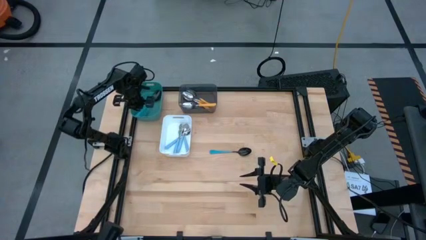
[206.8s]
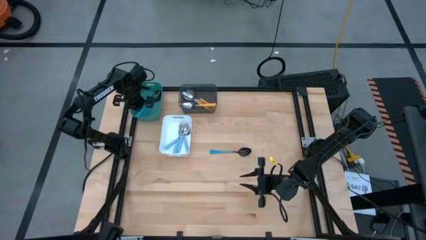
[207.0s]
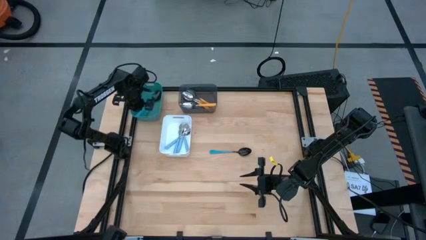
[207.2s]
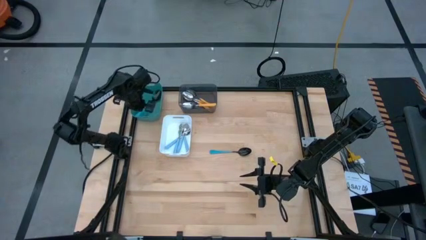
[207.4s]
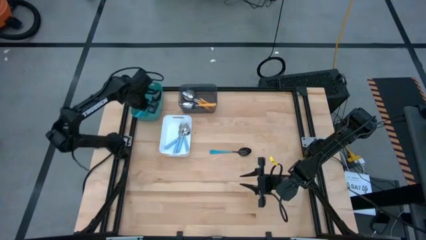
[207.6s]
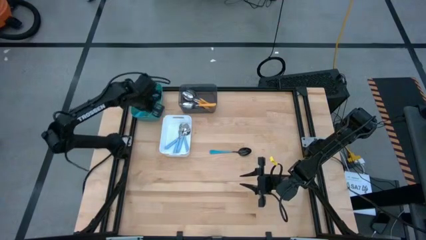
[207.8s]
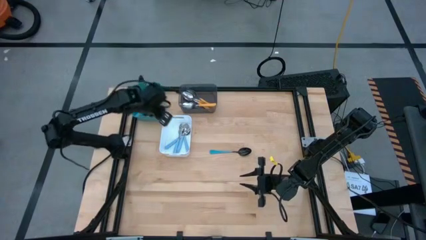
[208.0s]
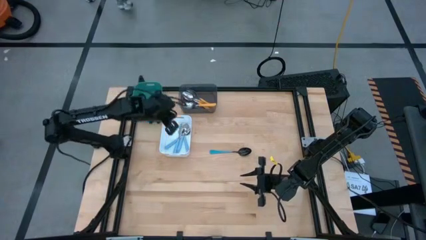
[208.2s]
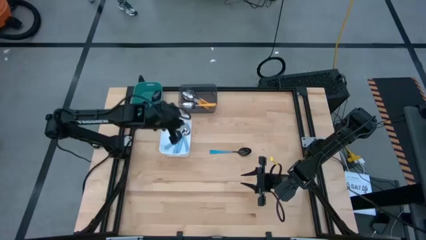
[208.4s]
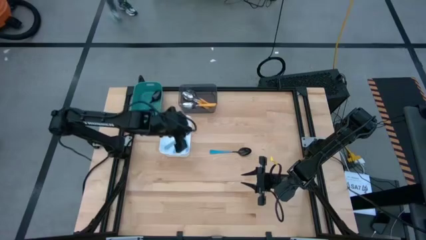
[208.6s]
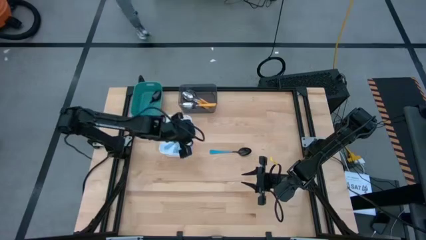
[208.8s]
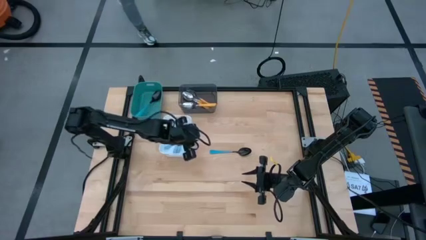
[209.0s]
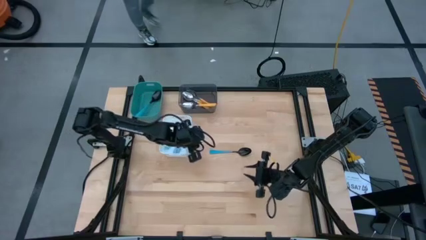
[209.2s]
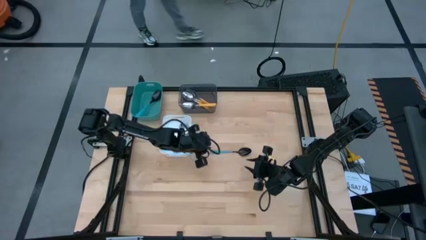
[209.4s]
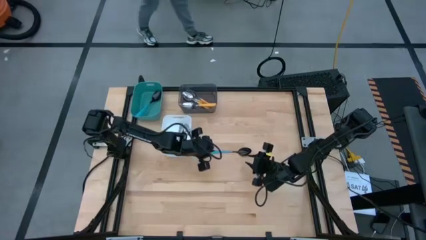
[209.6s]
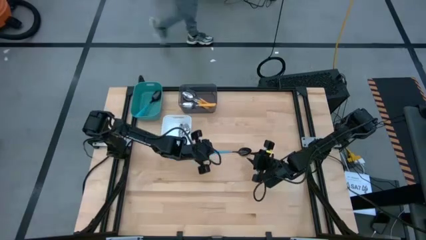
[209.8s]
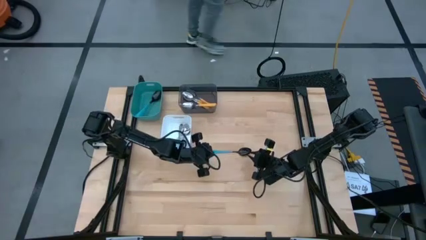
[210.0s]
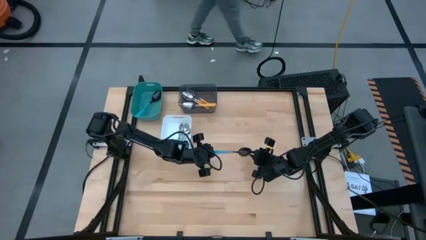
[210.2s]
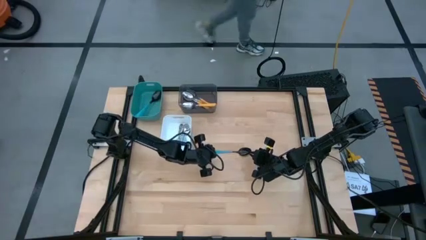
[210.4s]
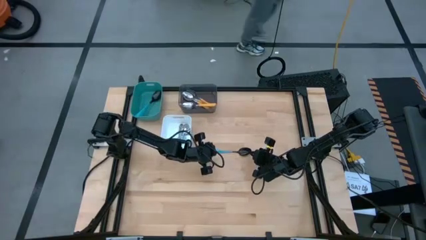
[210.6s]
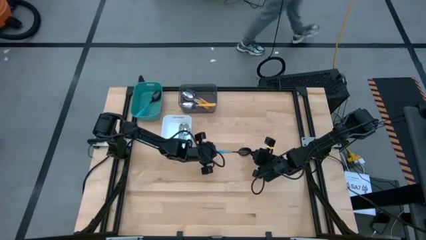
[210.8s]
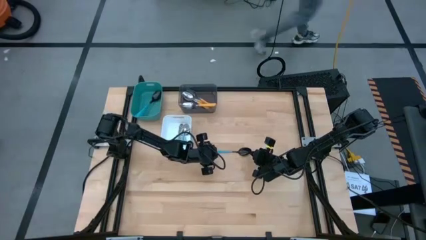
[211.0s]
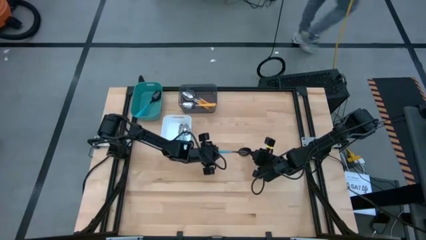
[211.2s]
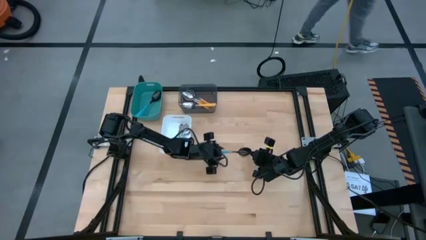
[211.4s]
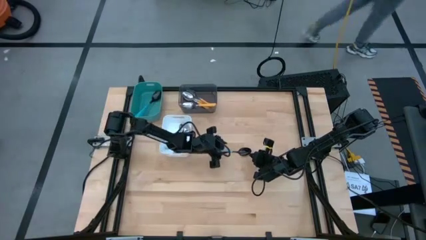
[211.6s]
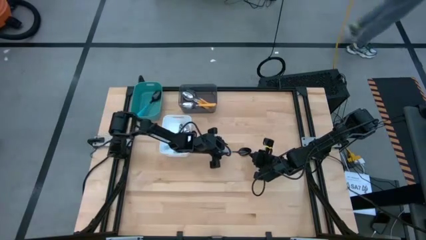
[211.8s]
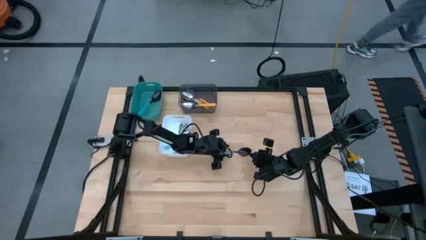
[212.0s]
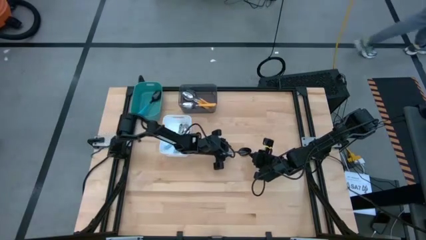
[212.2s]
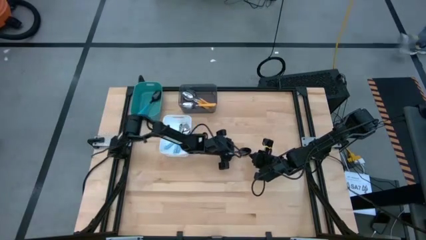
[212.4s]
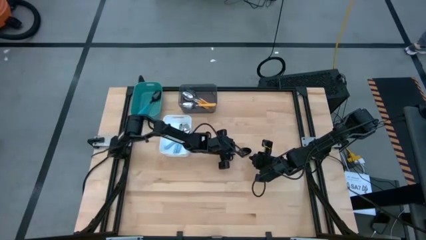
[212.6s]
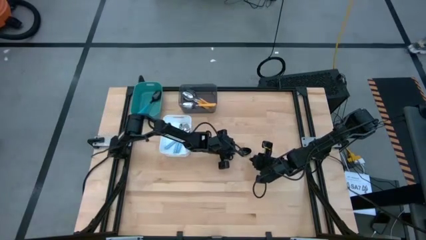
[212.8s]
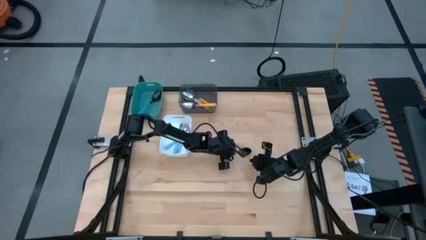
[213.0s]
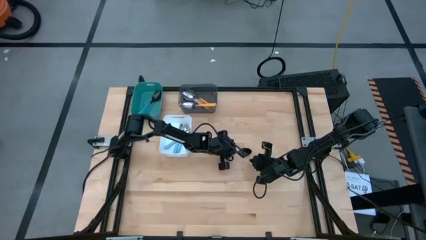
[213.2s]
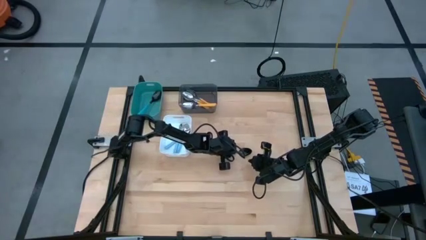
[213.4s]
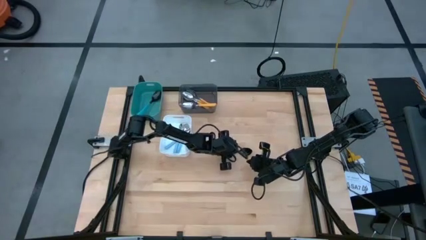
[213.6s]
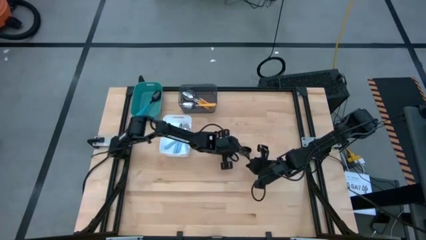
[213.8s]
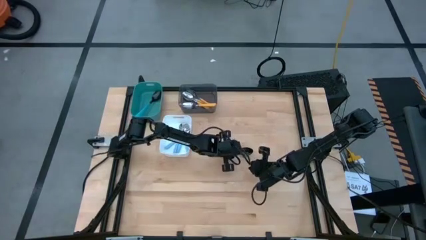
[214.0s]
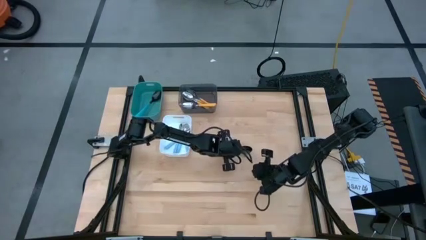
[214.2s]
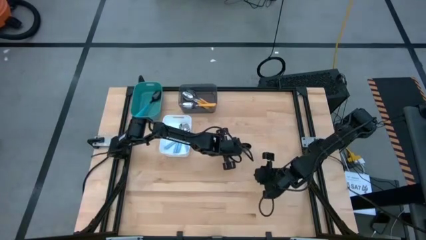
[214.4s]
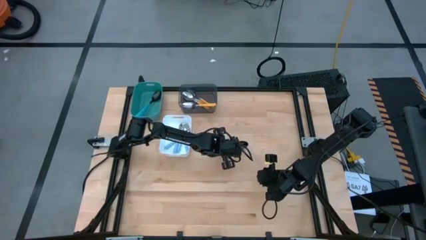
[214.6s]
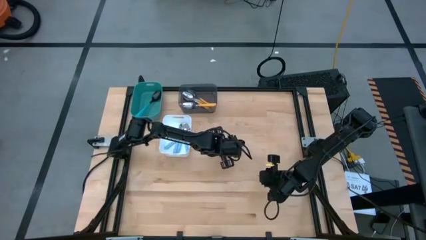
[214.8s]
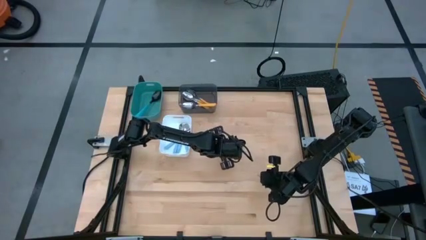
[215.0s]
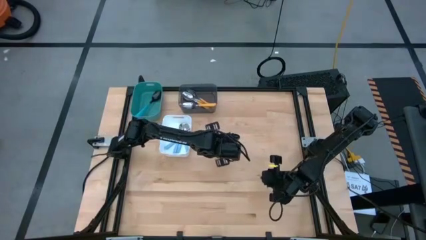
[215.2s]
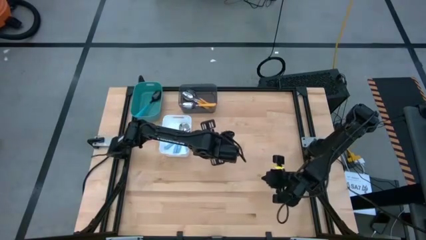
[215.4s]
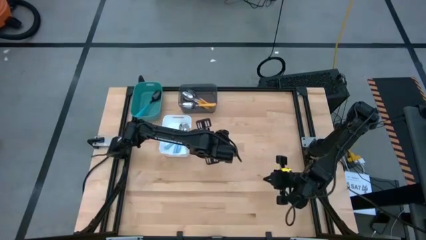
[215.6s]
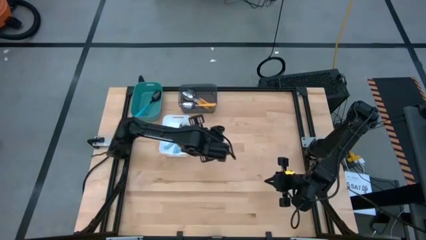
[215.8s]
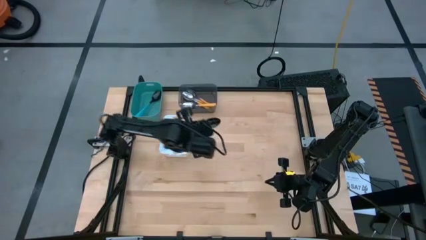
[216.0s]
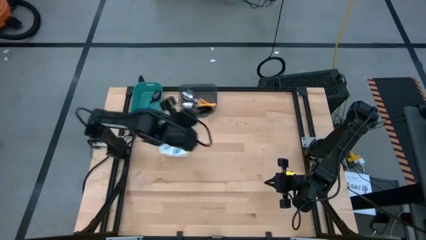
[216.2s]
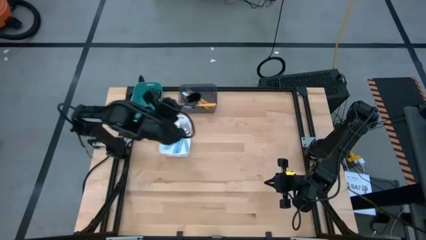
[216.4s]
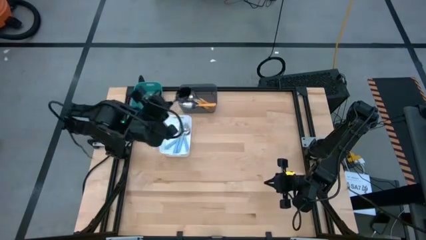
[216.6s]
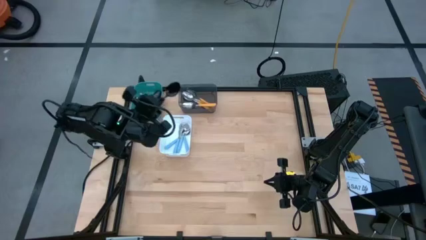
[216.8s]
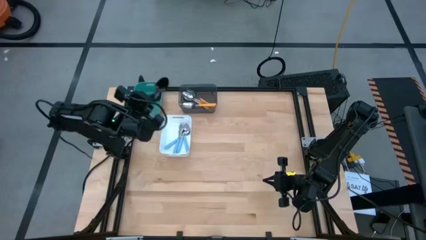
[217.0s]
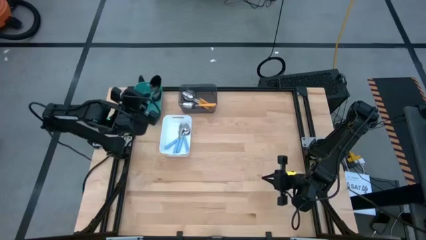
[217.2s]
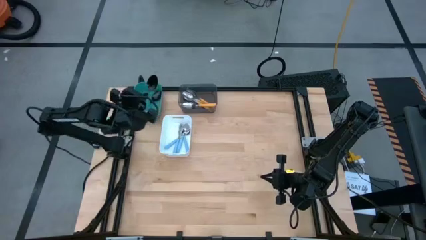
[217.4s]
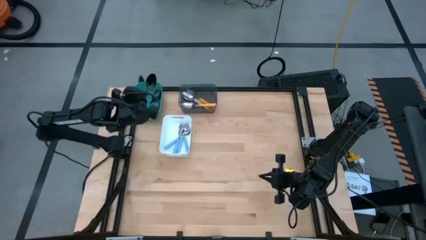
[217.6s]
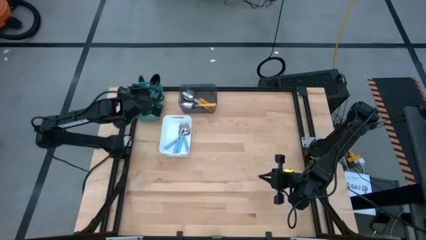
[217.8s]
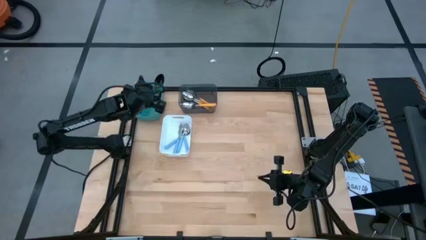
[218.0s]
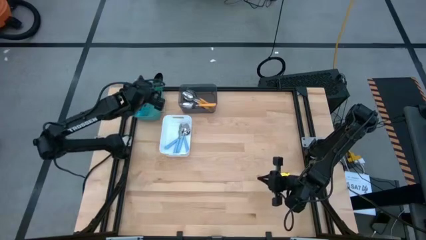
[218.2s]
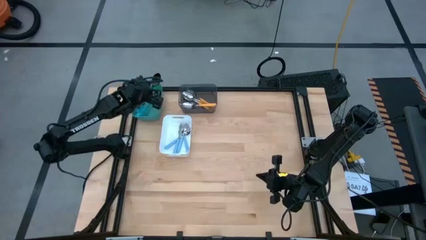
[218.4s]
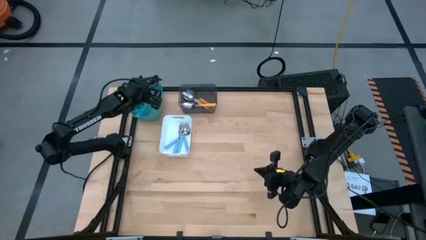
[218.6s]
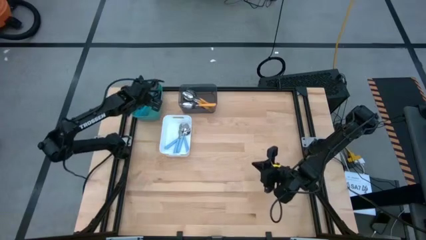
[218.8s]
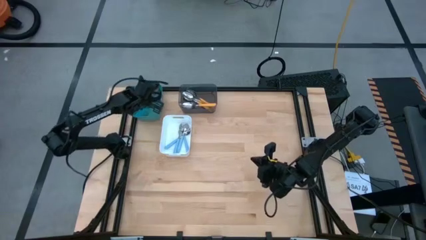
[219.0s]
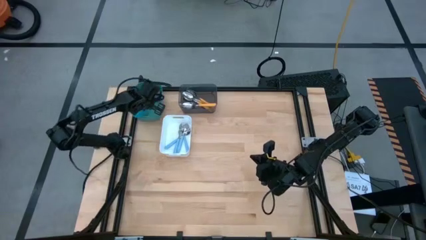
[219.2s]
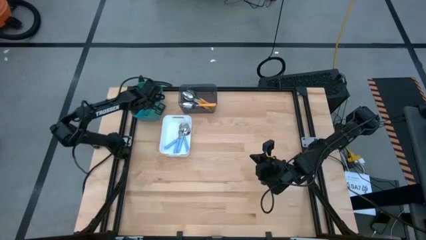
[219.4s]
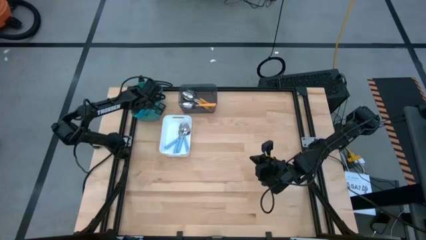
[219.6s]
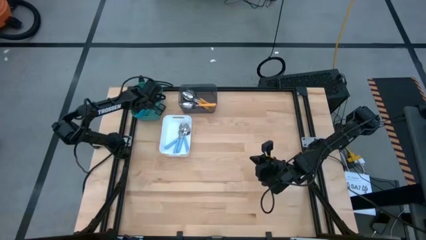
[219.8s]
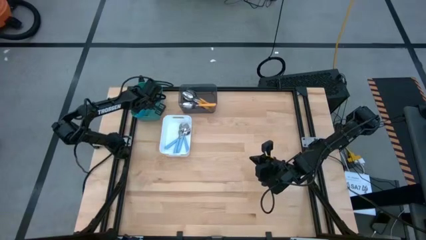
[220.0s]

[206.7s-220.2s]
Task: Sort silverware by color (type)
Put the blue spoon into the green bin

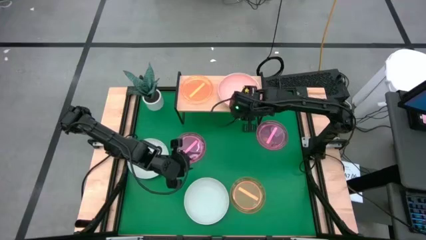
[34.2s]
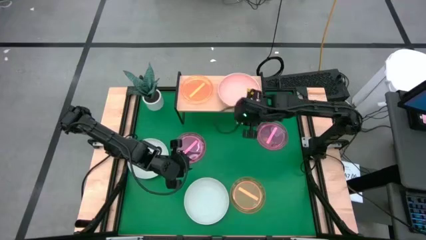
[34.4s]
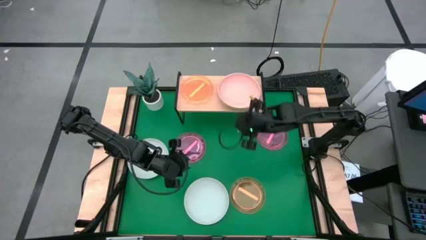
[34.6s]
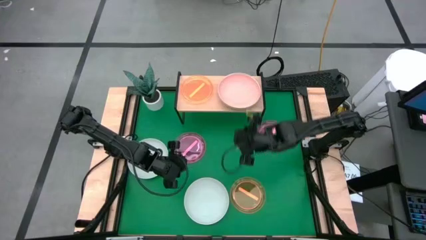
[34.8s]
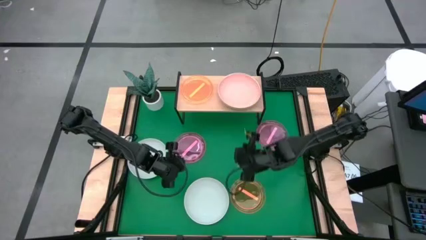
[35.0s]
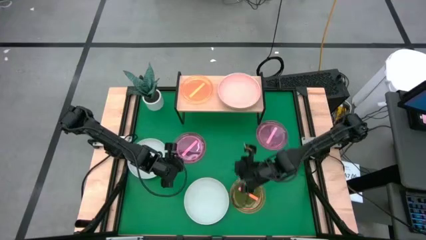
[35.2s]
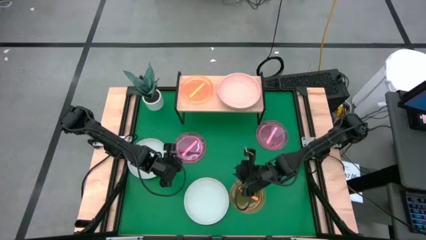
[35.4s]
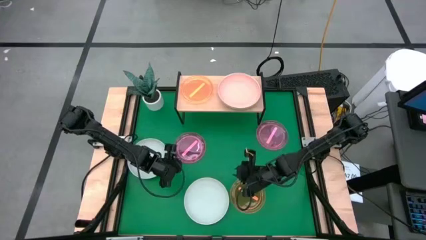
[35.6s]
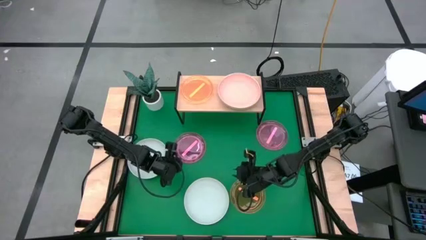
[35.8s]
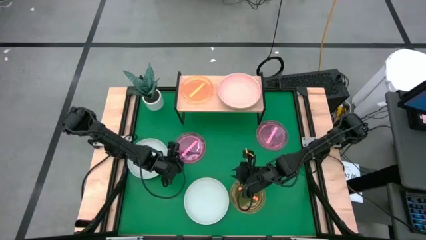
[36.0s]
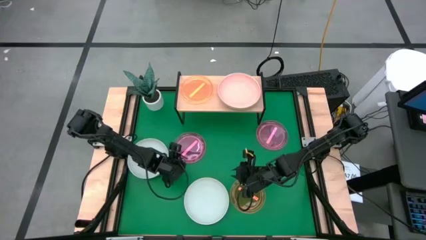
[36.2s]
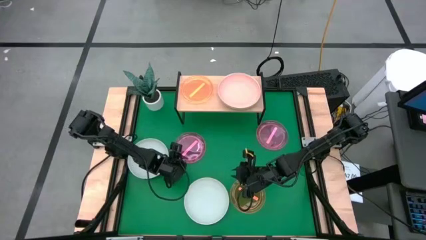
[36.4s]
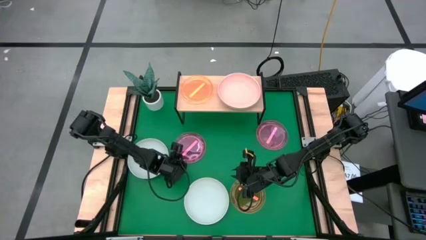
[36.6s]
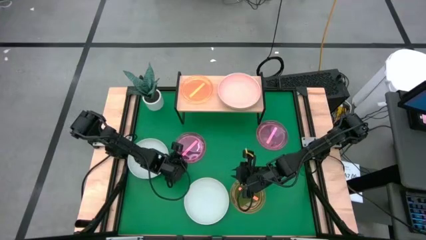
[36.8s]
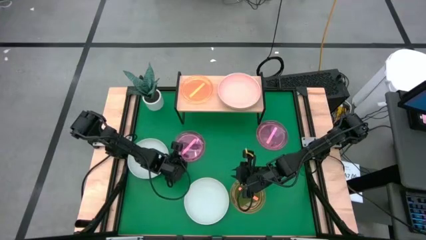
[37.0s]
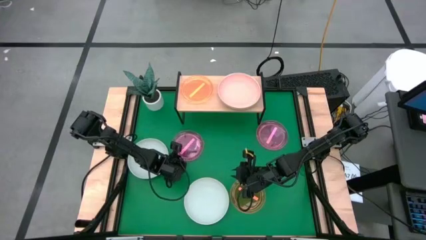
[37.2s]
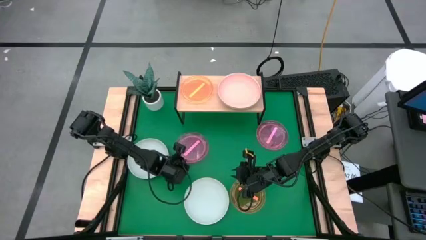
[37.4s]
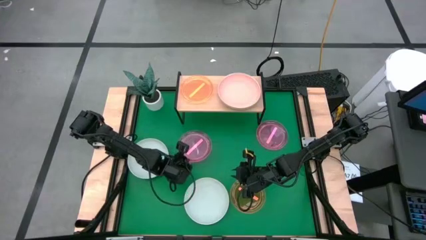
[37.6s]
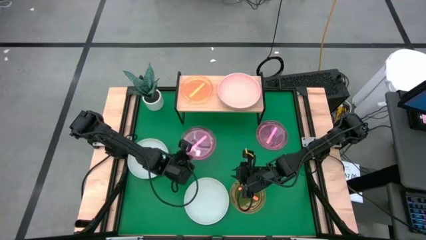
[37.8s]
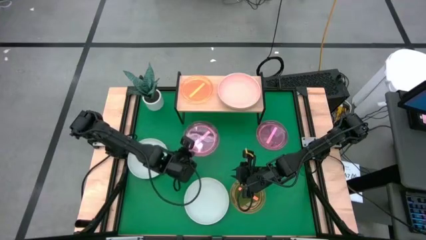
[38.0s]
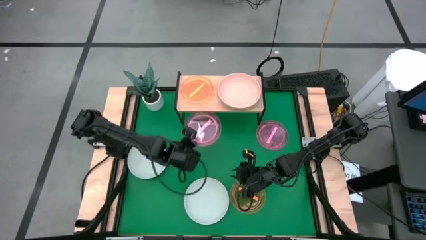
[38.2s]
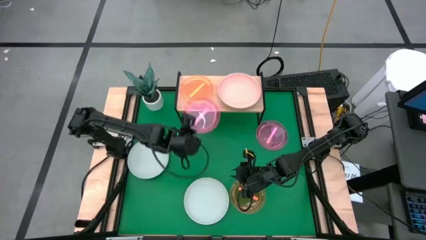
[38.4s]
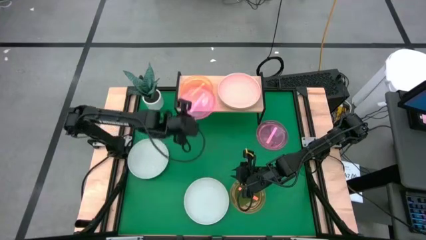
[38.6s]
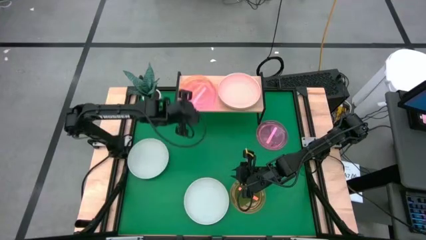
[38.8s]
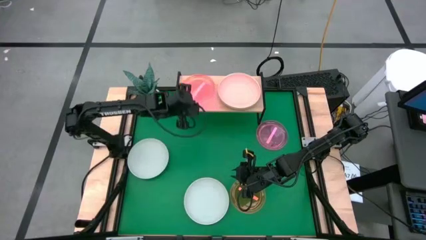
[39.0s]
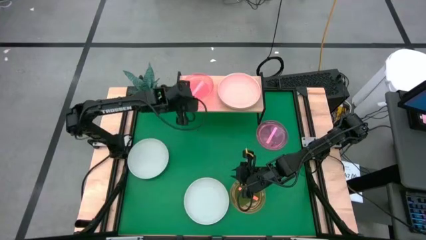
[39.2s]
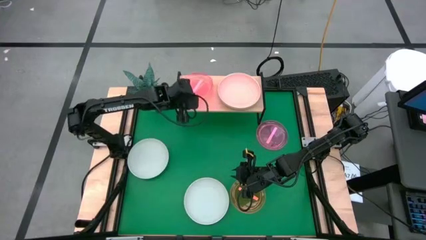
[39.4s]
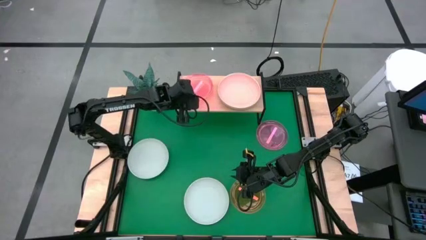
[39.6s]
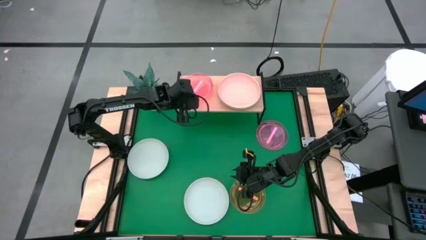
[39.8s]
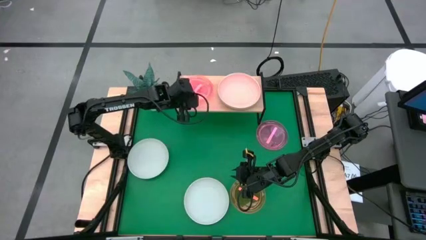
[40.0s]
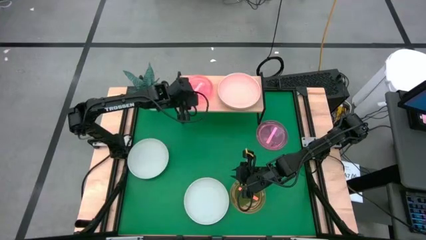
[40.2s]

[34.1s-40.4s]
Task: Place and stack plates onto a shelf
Stack the left transparent pink plate on top of the transparent orange plate on the shelf
